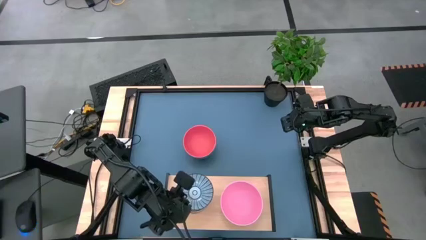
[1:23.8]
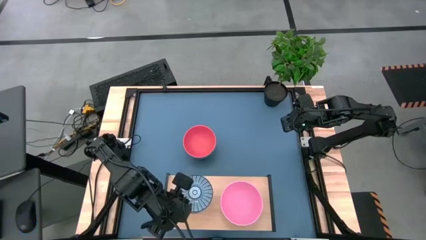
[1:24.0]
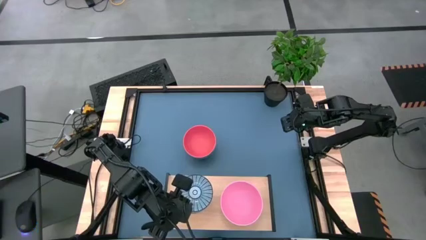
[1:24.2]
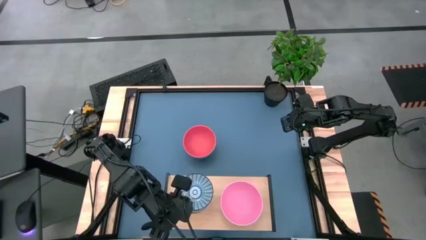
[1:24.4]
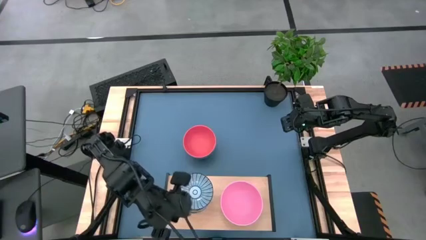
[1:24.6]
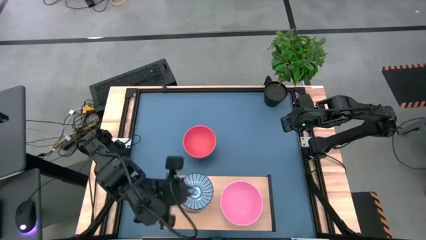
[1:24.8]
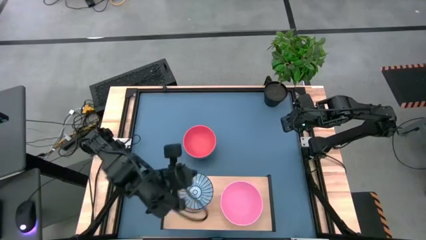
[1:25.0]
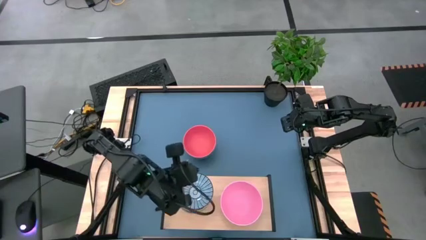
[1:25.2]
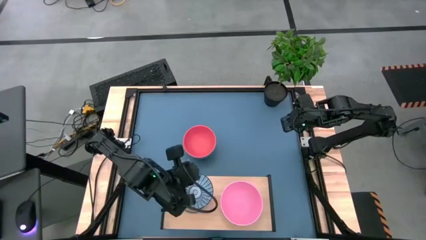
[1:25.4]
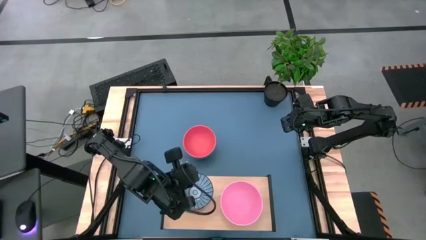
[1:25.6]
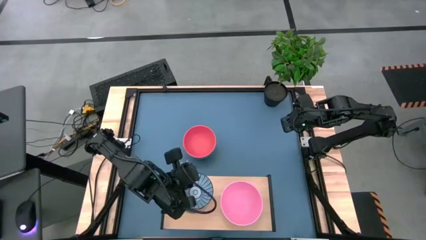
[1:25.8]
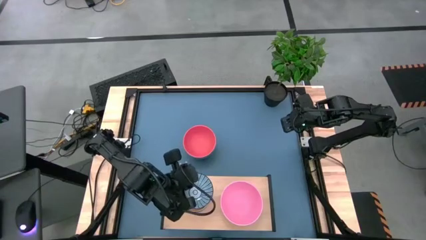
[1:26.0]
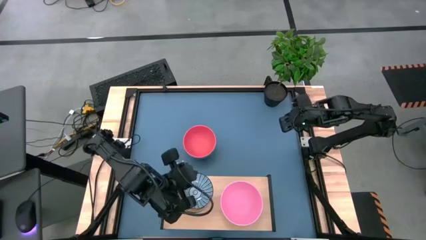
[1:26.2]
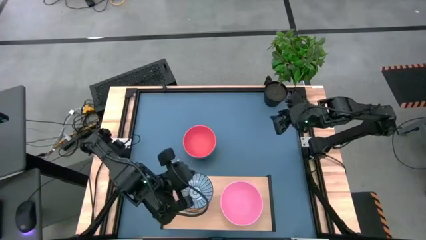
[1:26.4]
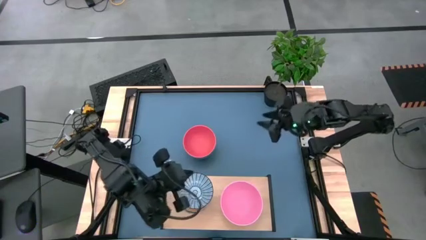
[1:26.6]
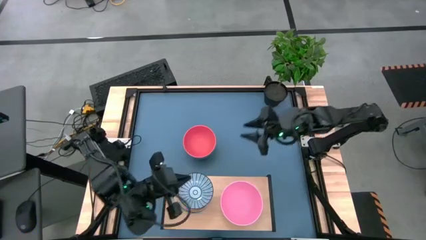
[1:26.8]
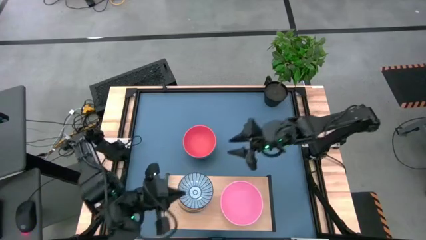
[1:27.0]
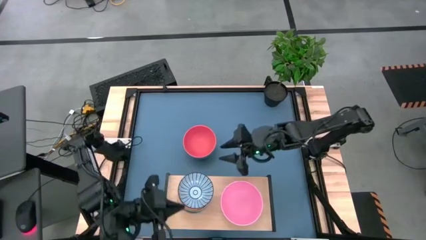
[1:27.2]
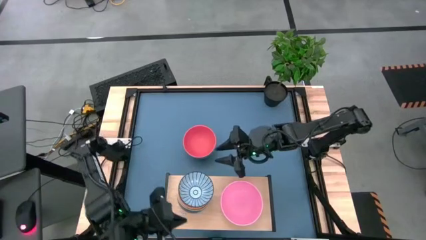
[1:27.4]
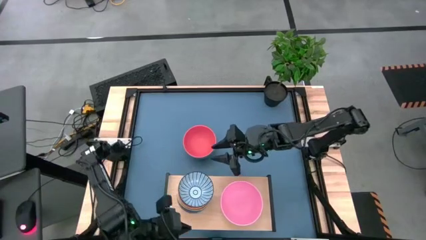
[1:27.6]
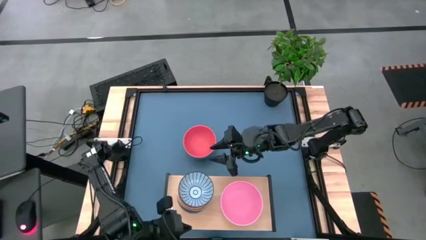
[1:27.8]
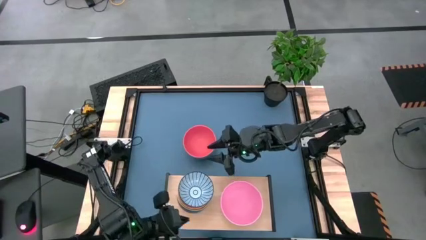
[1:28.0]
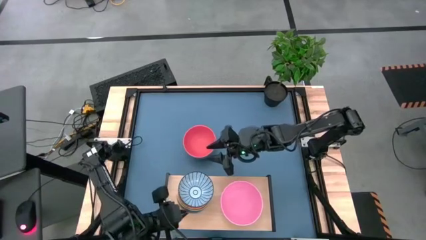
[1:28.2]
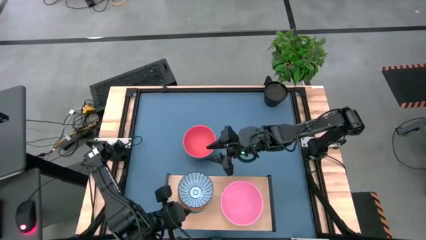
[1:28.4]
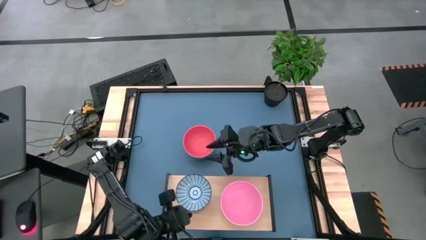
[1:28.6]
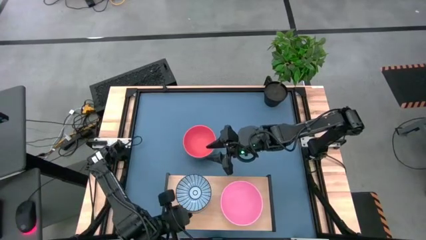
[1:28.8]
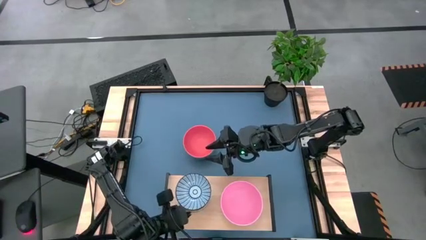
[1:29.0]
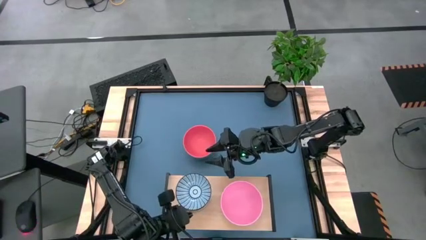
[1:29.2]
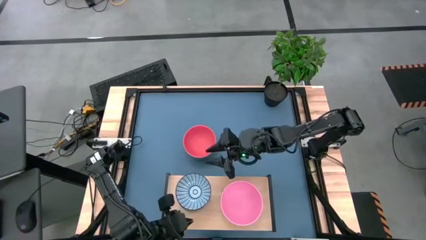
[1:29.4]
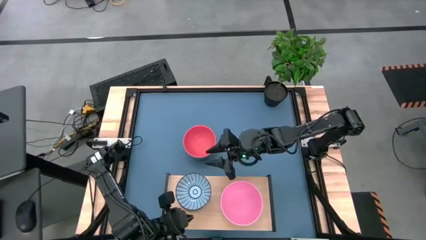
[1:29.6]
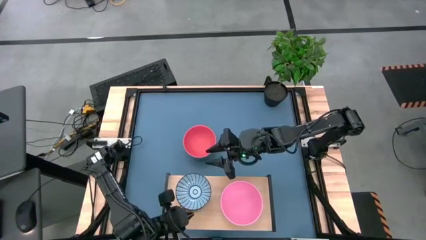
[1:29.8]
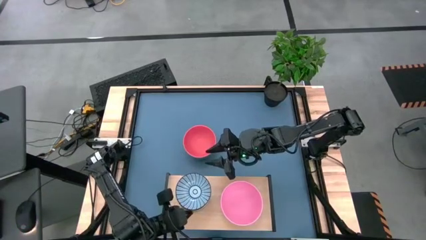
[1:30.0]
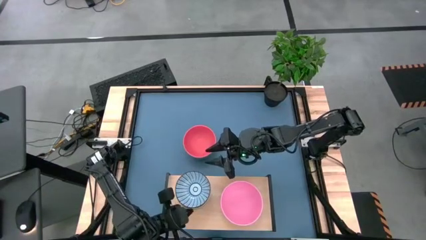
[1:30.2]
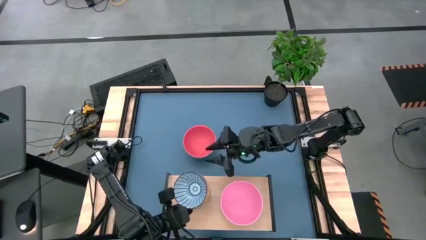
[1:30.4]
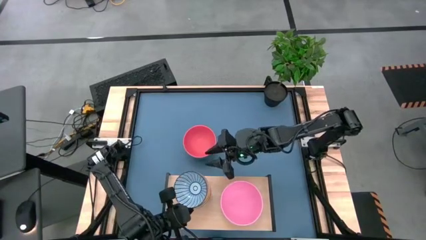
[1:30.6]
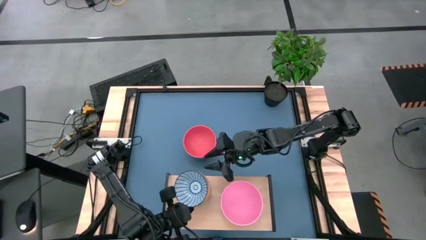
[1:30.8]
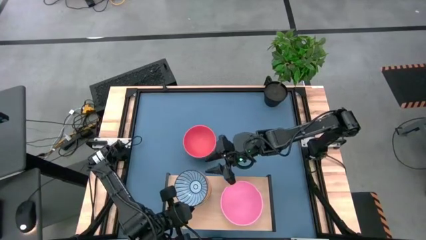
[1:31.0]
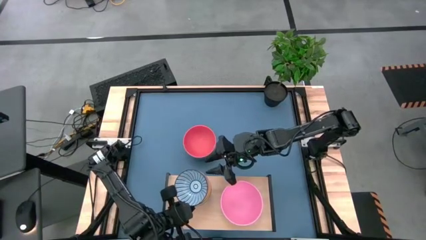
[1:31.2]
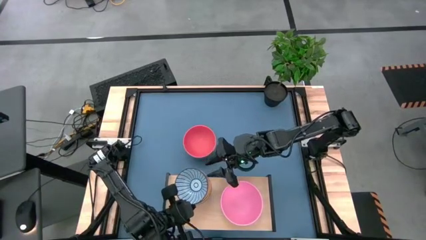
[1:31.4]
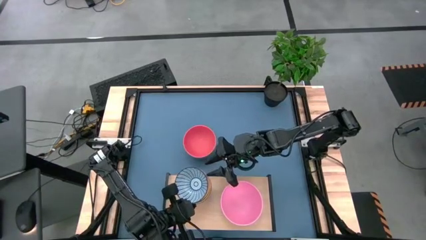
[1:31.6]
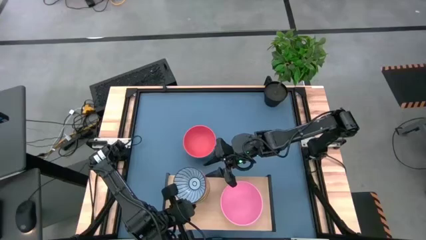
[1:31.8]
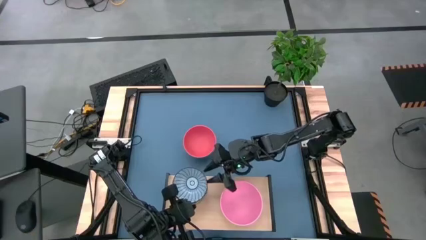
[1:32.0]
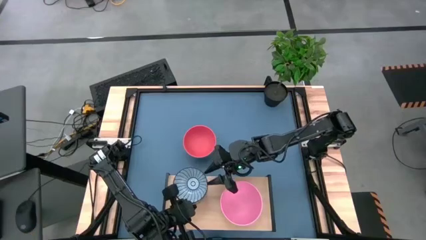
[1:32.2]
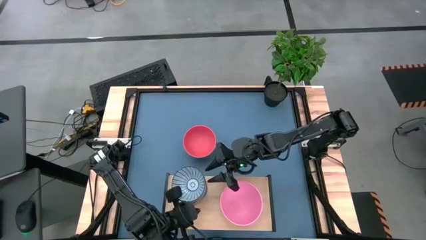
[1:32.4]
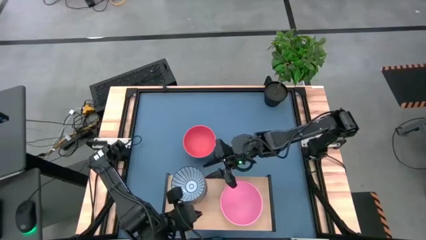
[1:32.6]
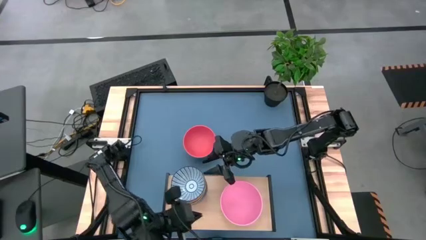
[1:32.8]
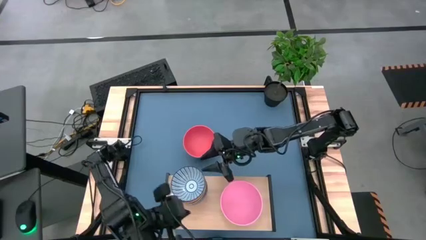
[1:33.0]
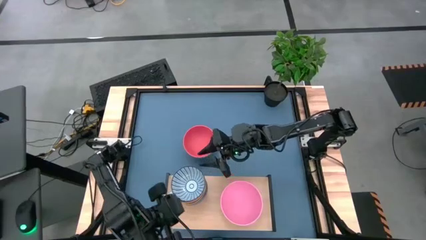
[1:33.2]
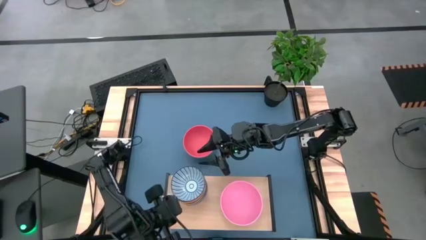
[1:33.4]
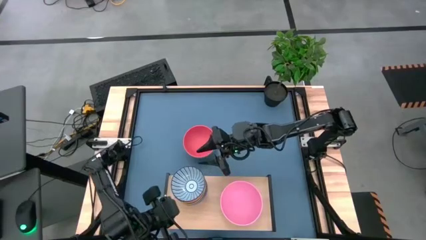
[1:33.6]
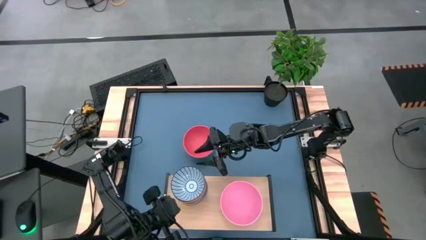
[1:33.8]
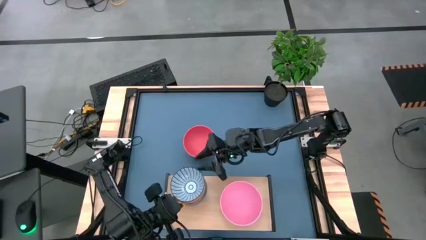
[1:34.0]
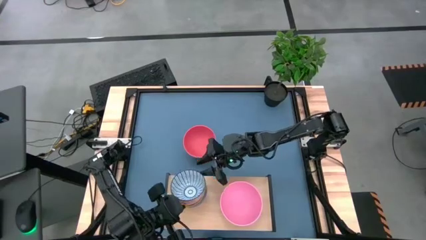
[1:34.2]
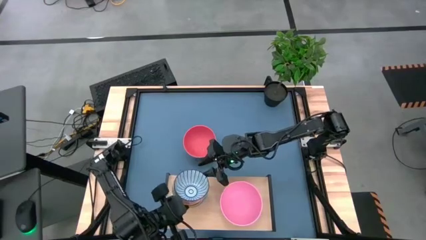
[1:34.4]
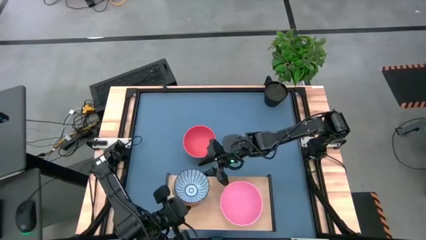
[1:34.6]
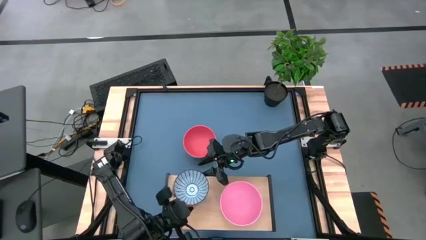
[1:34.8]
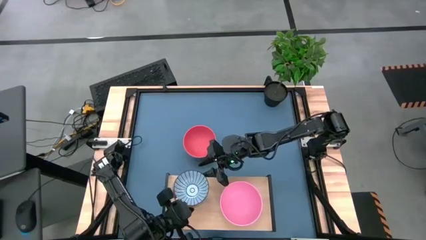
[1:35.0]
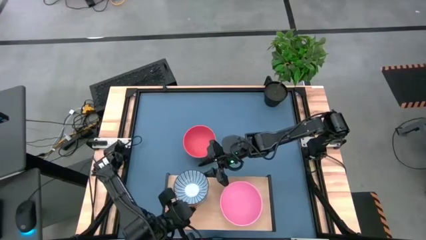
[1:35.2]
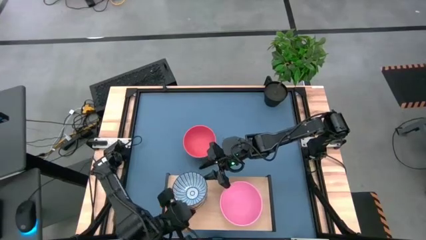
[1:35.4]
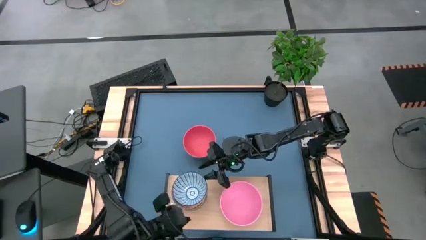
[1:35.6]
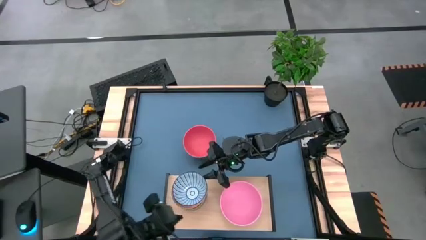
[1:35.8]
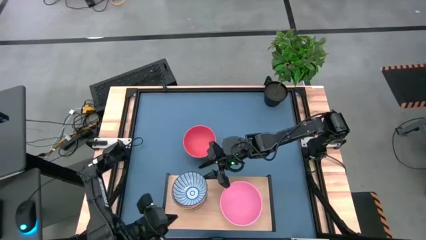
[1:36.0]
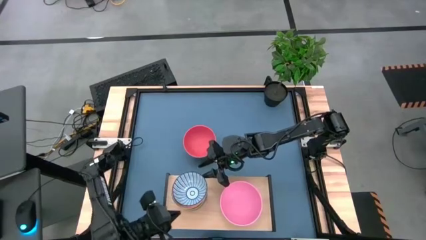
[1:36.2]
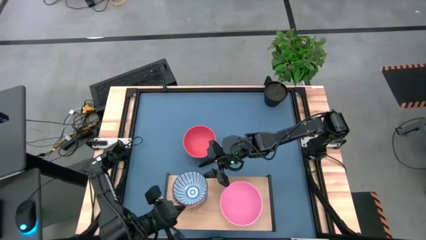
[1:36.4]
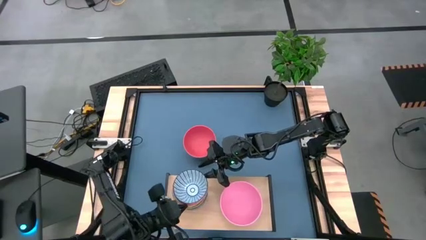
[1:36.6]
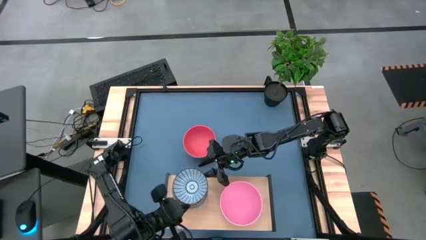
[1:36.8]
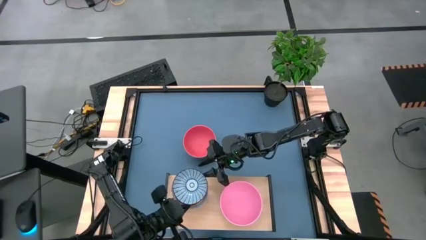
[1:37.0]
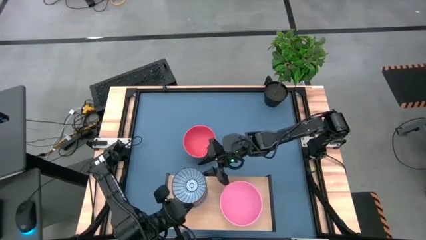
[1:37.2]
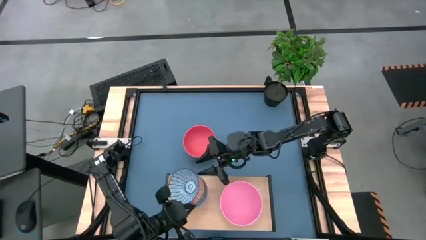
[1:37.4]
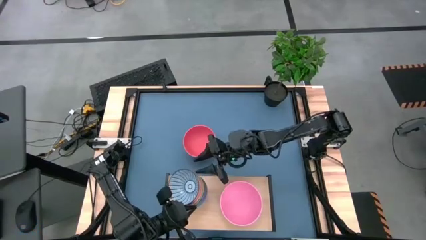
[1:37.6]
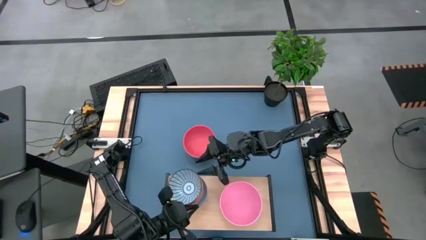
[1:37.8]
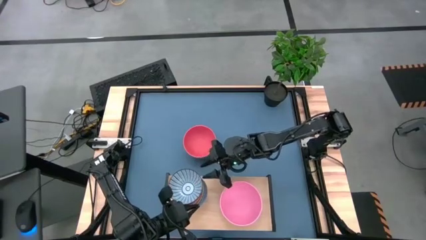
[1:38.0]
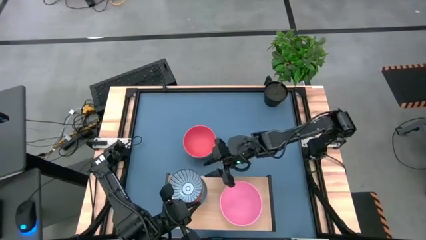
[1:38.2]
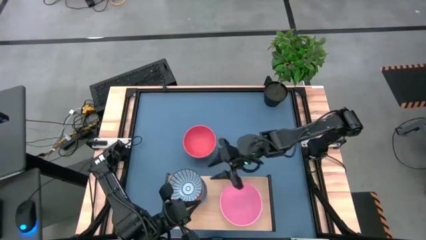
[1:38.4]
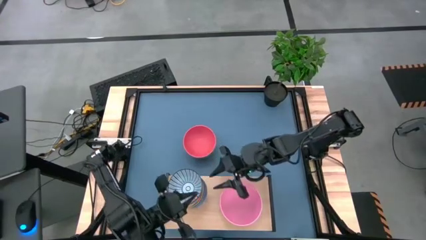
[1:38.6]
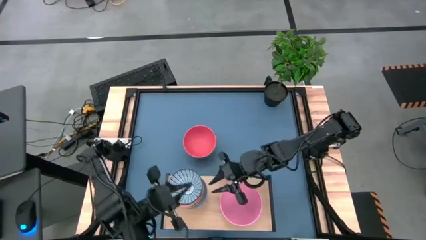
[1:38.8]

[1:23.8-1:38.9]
Task: Place and stack bowls onto a shelf
Adjust the stacked bowls on the shelf
